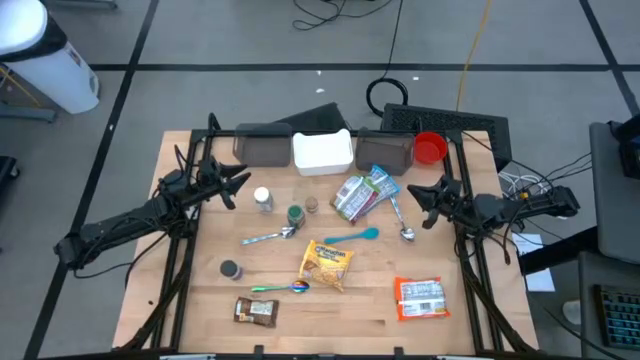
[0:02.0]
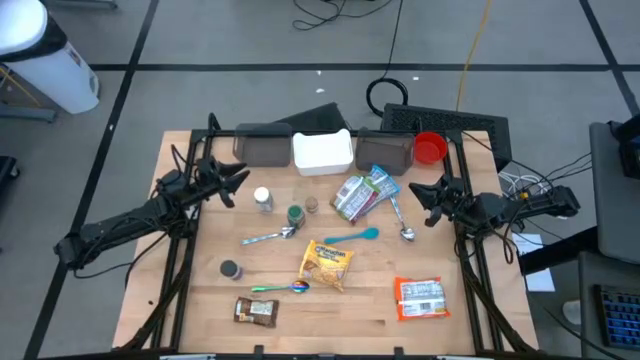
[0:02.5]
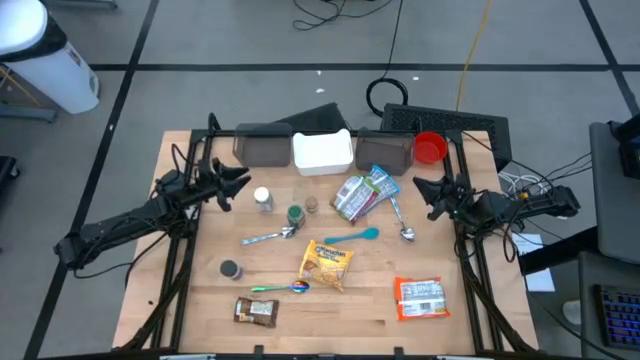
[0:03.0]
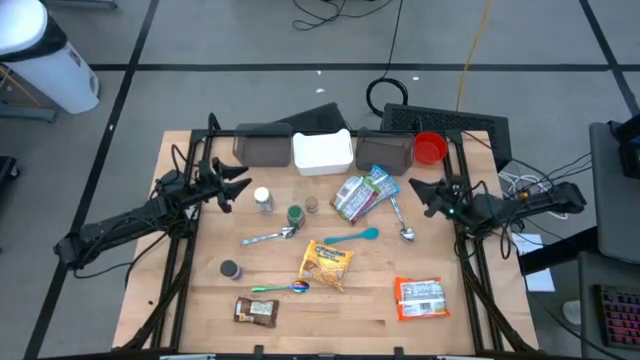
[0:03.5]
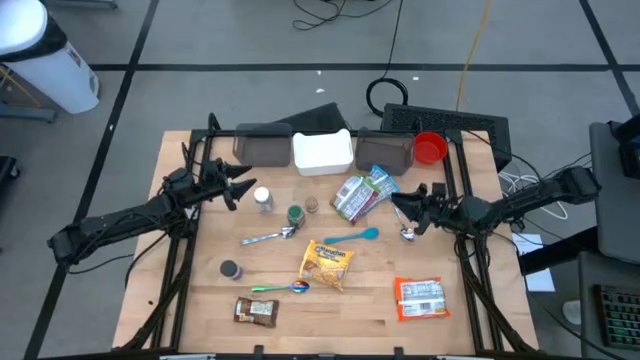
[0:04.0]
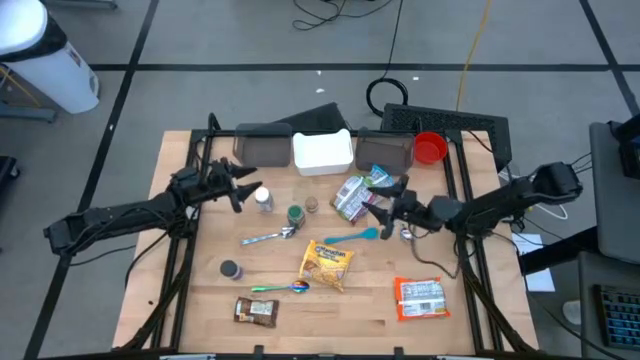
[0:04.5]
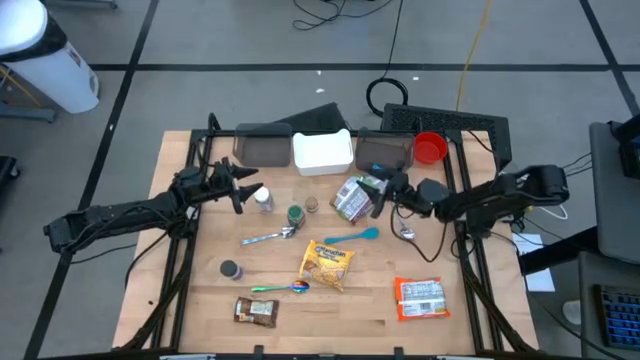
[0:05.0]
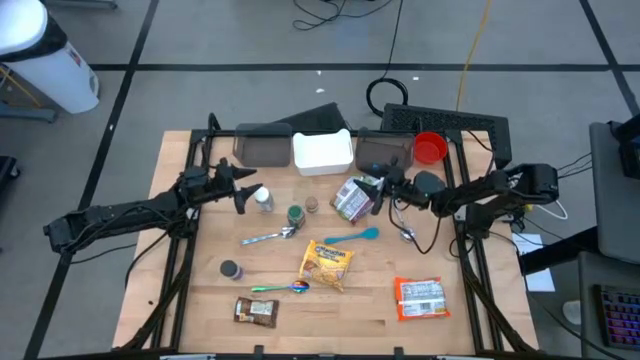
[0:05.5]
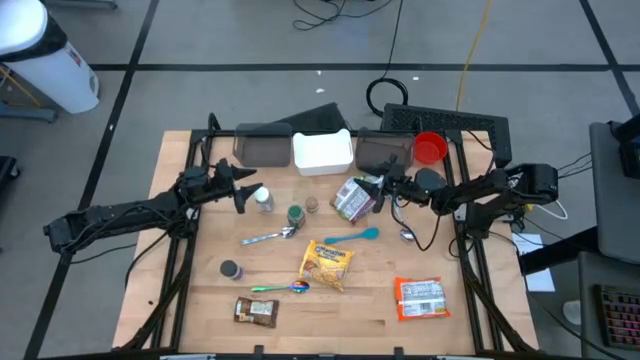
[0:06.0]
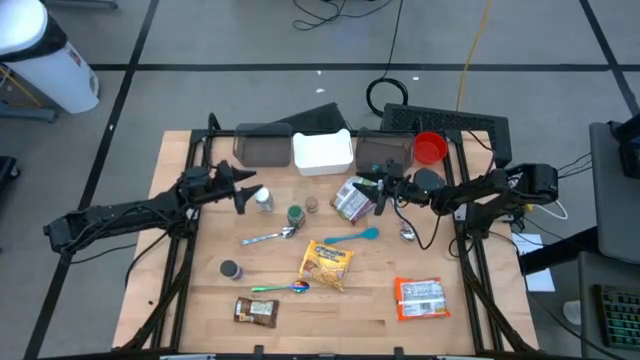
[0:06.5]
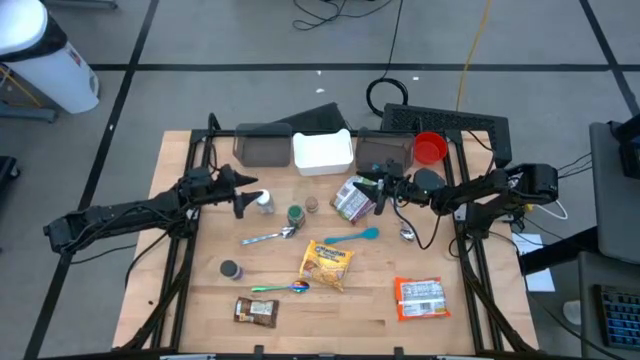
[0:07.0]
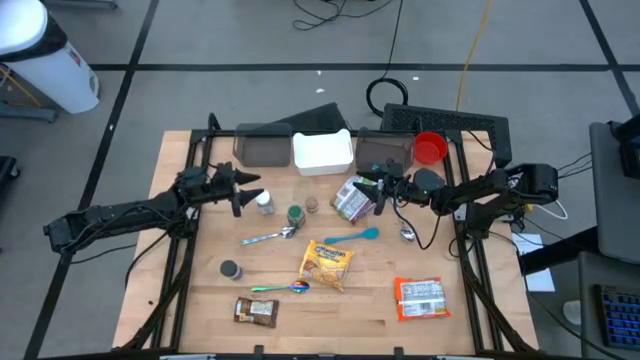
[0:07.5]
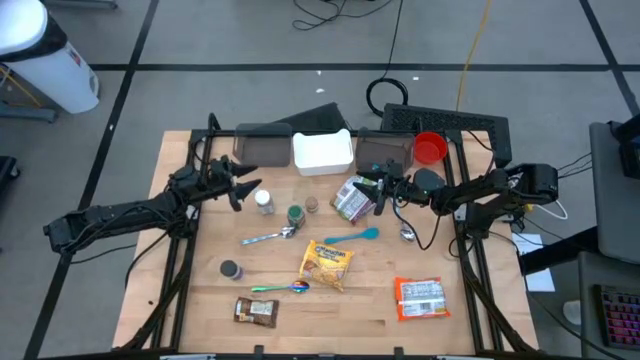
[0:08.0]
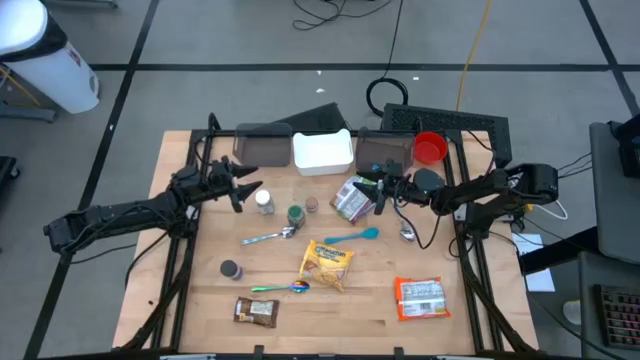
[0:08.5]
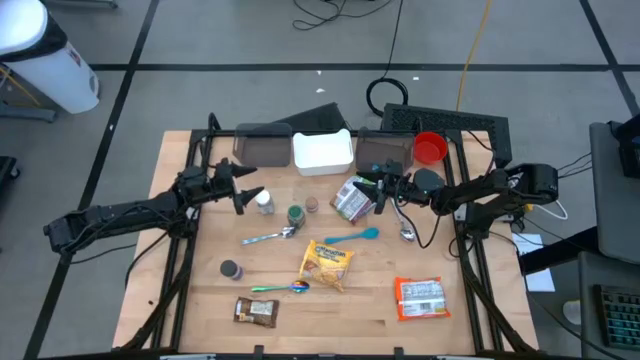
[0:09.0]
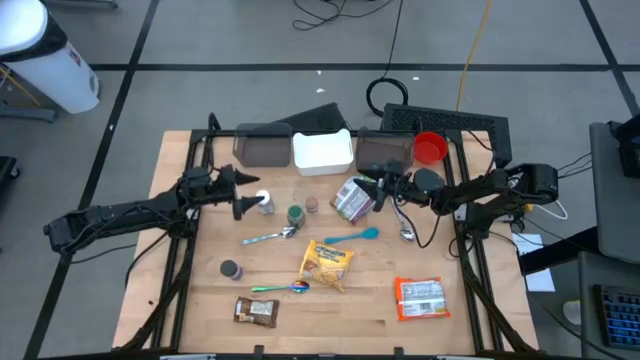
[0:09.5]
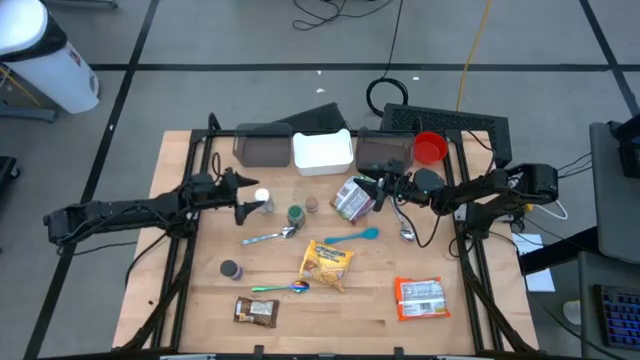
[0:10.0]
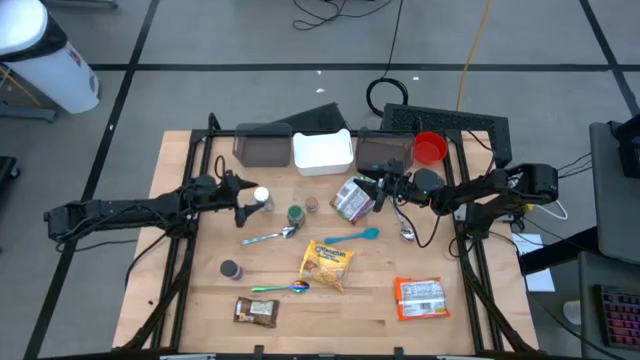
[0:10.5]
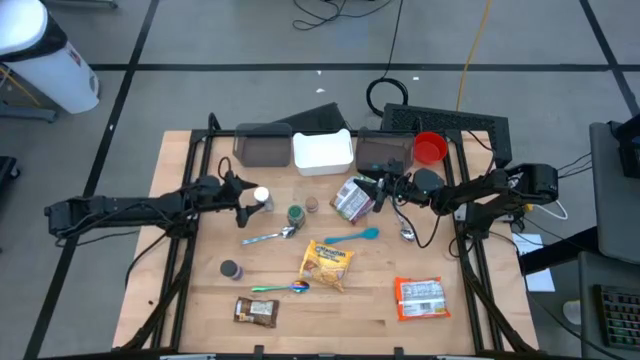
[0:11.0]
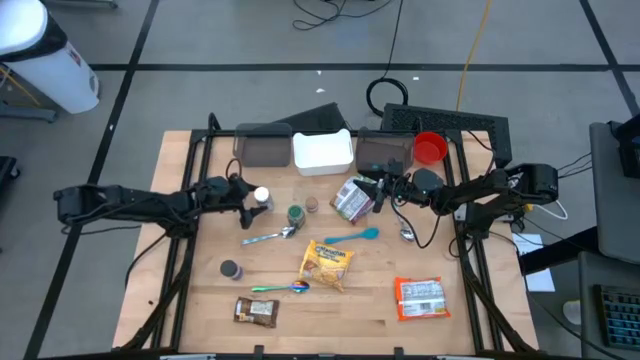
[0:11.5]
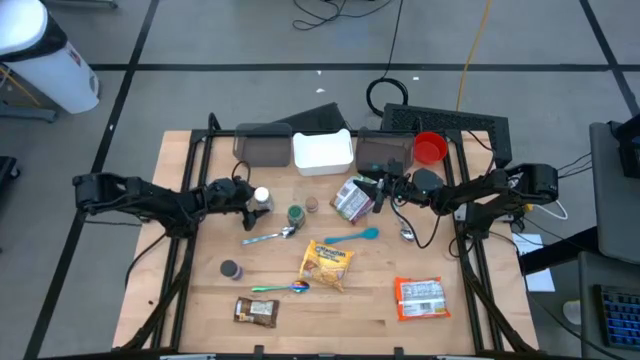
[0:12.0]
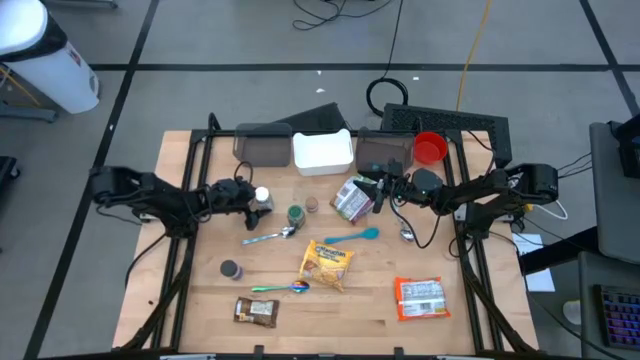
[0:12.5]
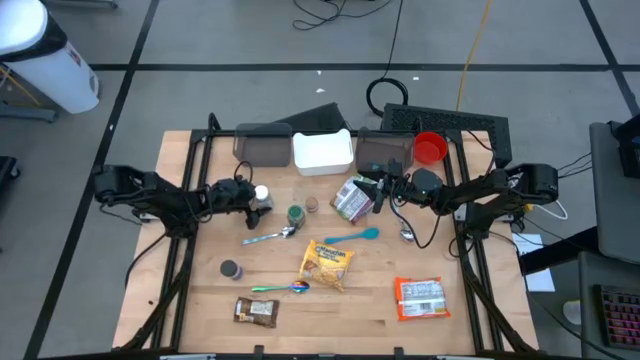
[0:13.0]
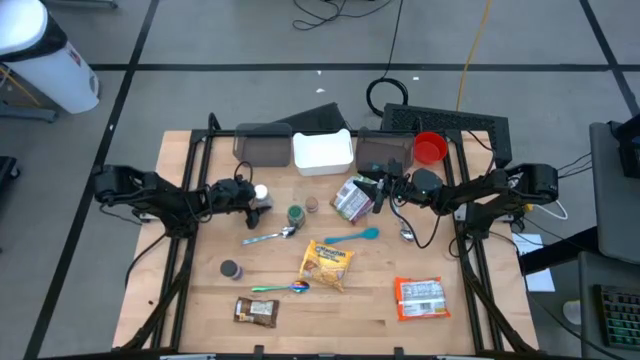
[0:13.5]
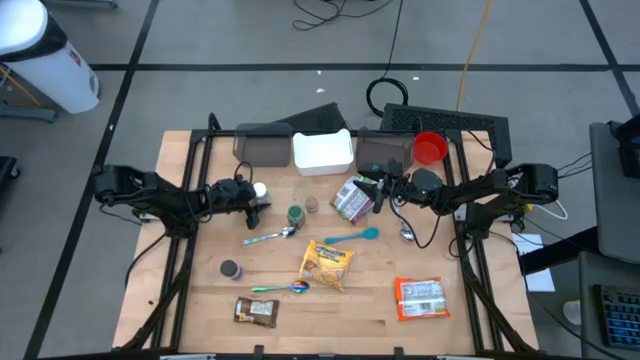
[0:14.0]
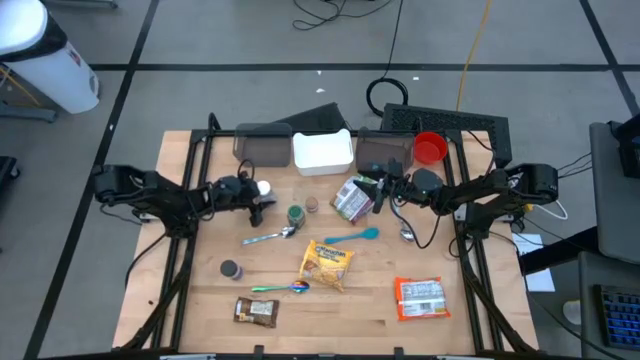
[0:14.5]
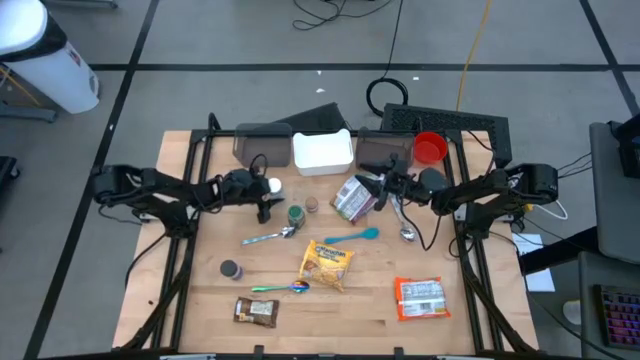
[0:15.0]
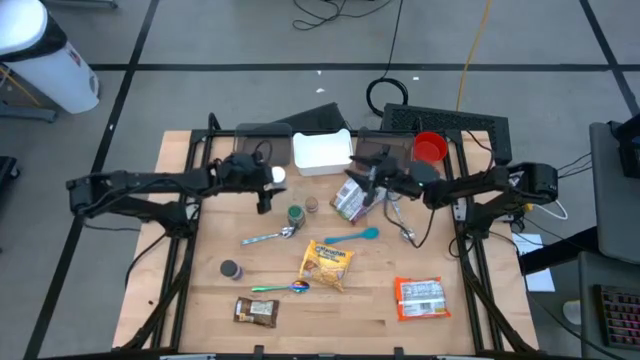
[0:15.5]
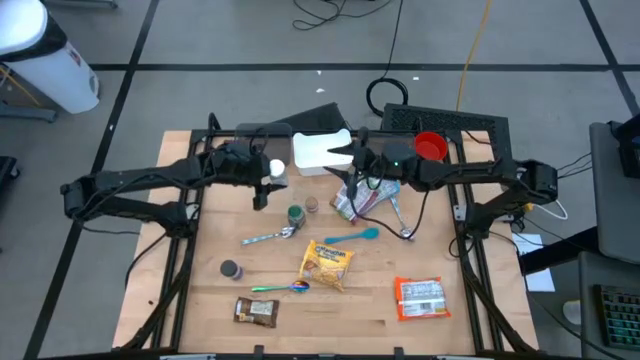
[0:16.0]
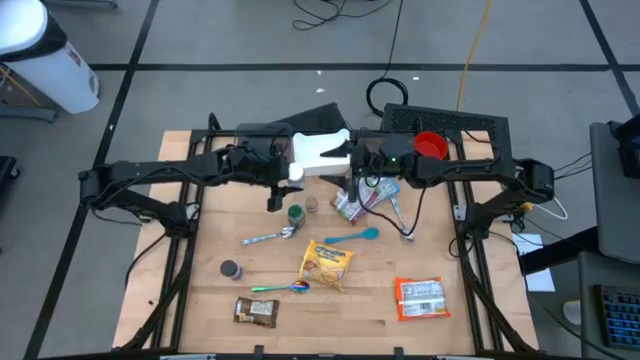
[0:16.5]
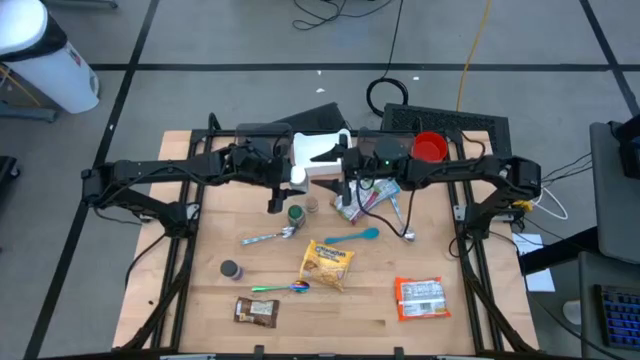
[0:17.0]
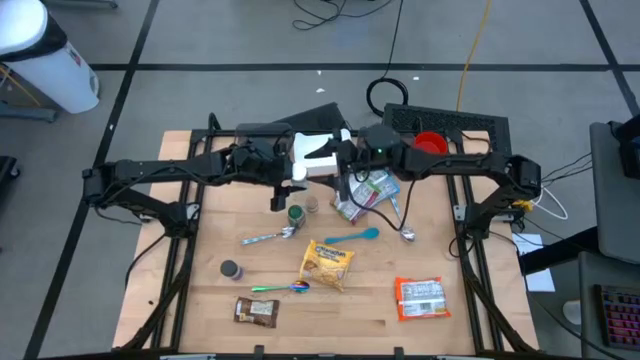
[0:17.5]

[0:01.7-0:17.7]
Task: Pick & Place Food Item
Put the white seasoning bottle into the right black bin

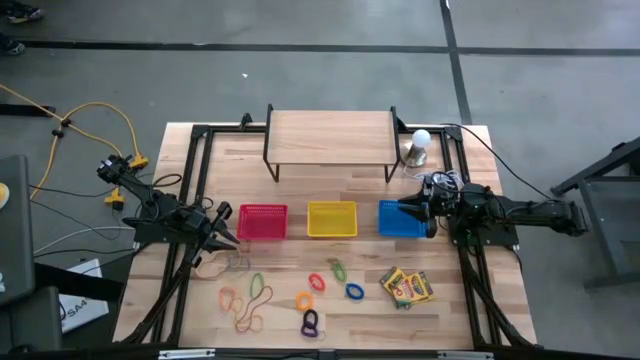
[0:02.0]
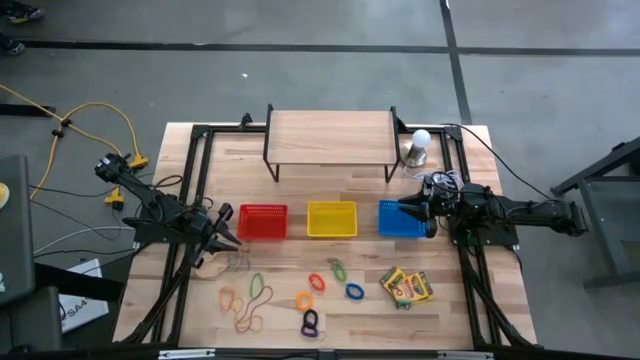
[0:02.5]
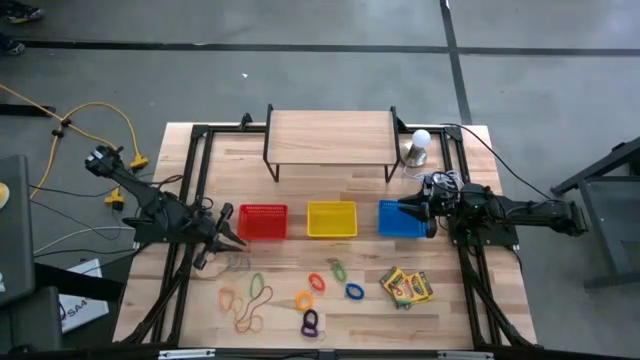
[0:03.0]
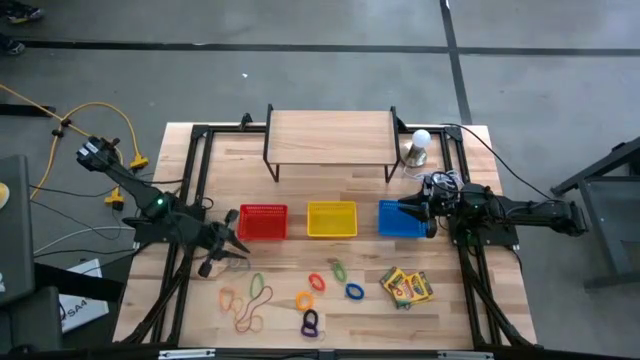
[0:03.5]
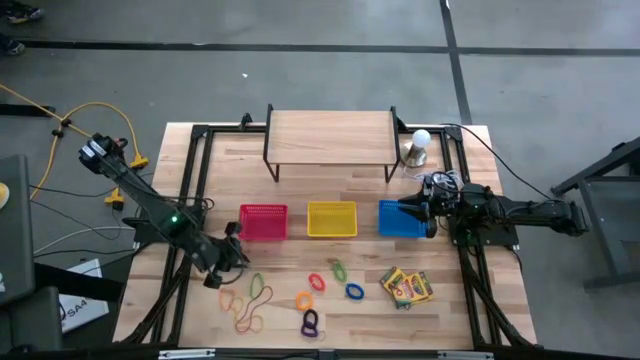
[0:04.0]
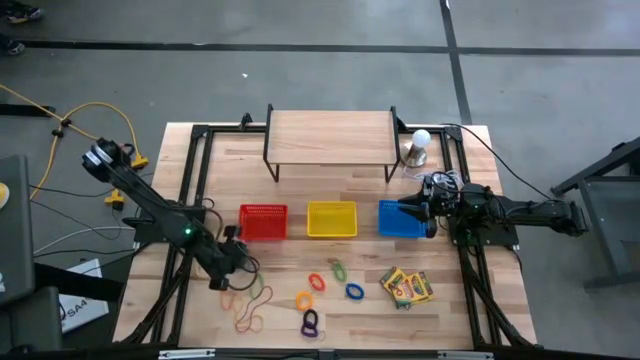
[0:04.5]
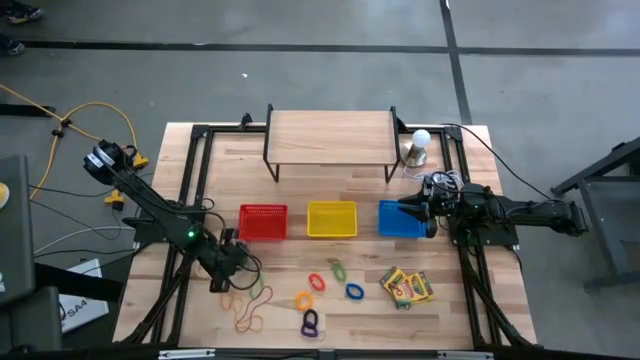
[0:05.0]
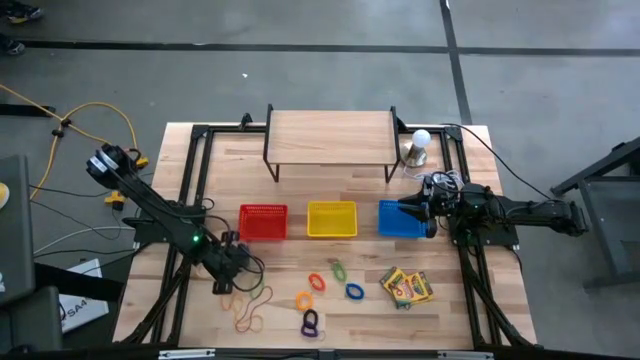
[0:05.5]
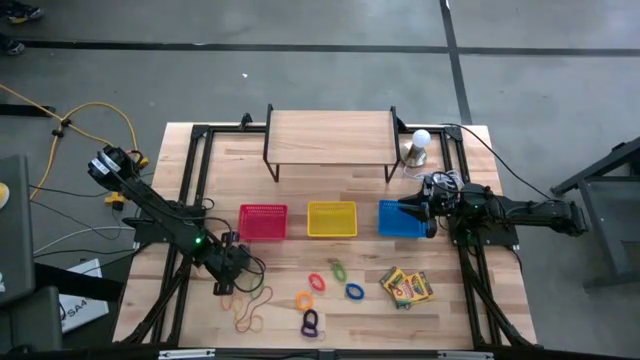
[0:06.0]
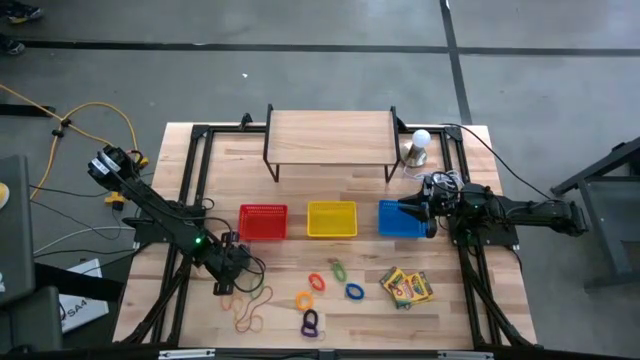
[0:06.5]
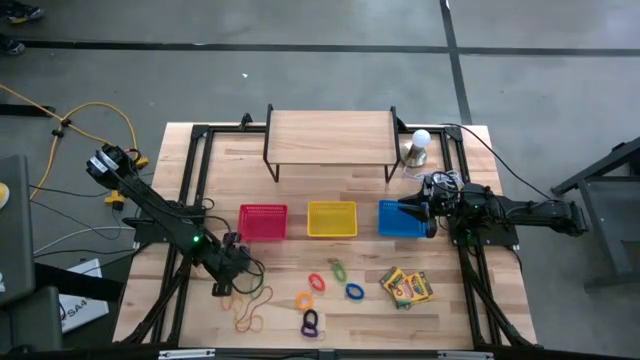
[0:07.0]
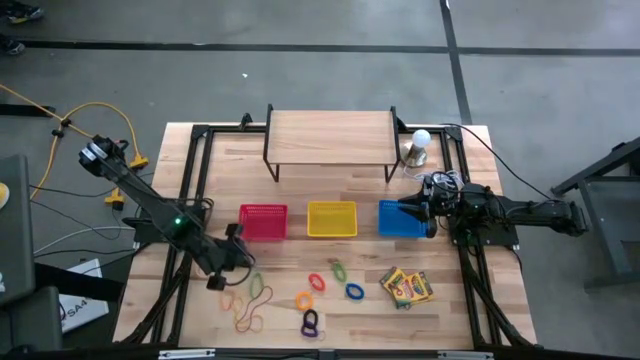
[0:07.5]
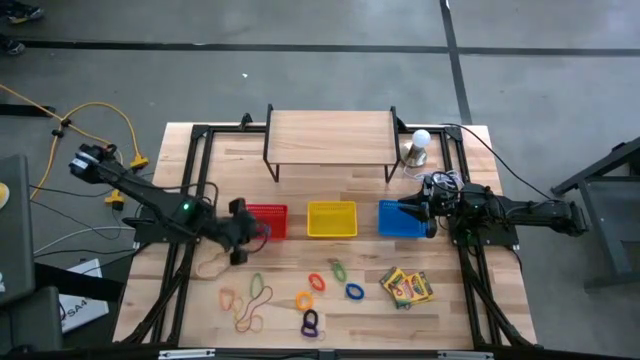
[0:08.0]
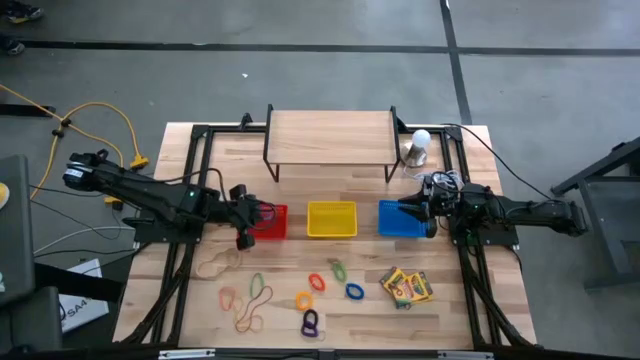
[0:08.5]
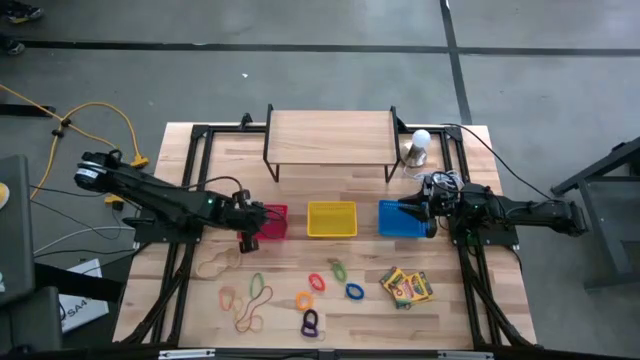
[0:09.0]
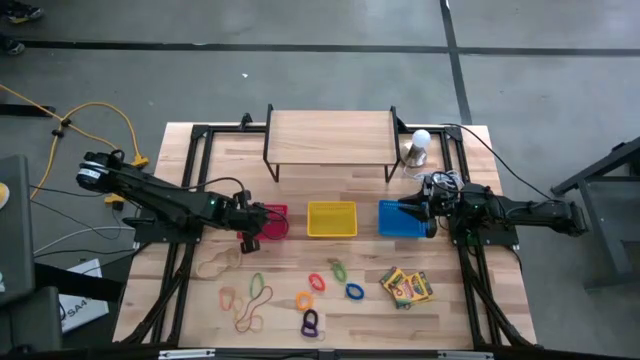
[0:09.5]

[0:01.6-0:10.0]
Task: Pick & Place Office Desk Supplies
Put the blue rubber band into the red bin
